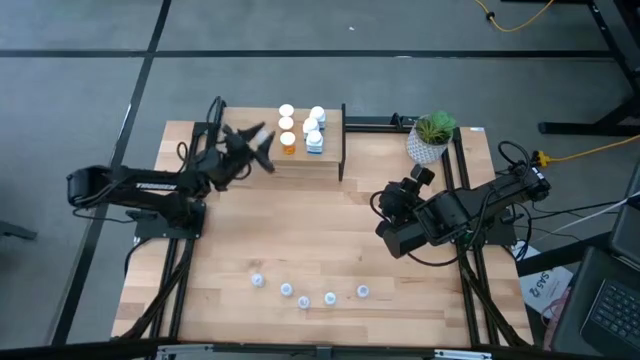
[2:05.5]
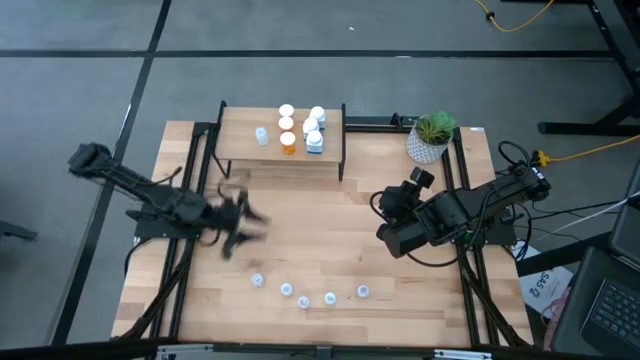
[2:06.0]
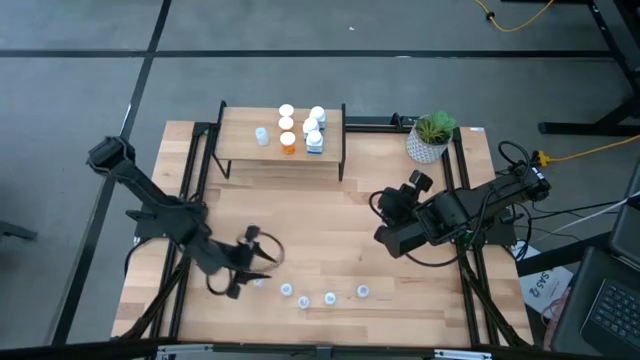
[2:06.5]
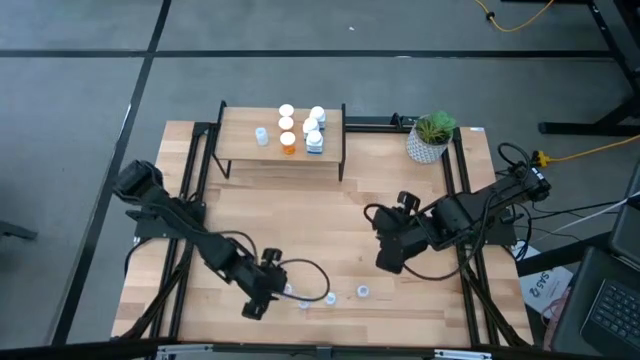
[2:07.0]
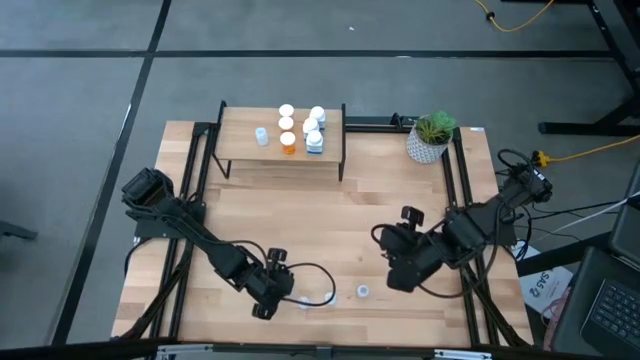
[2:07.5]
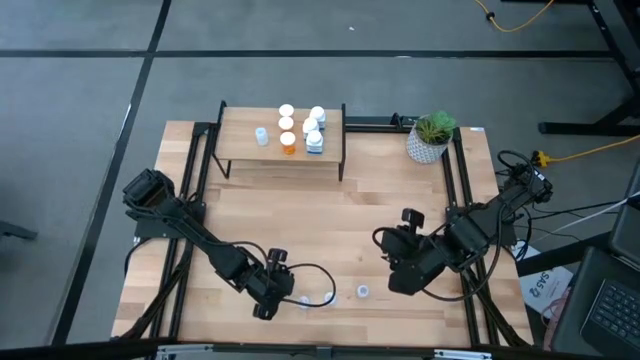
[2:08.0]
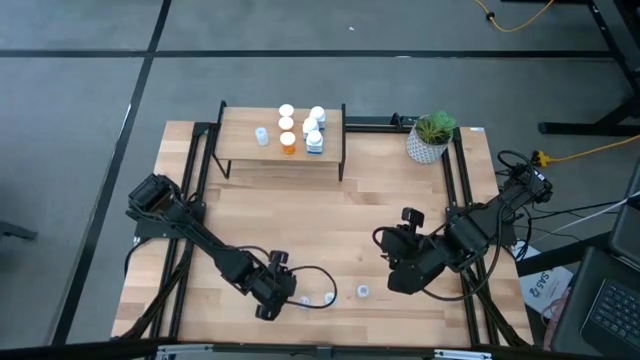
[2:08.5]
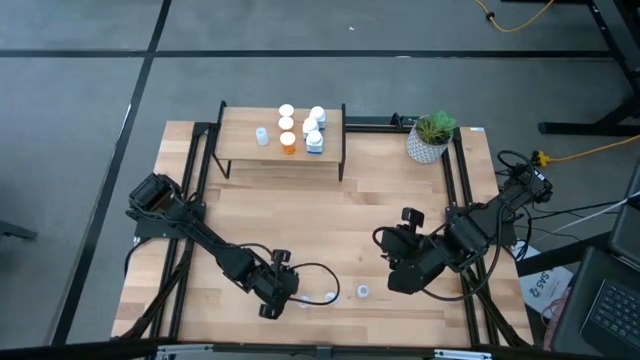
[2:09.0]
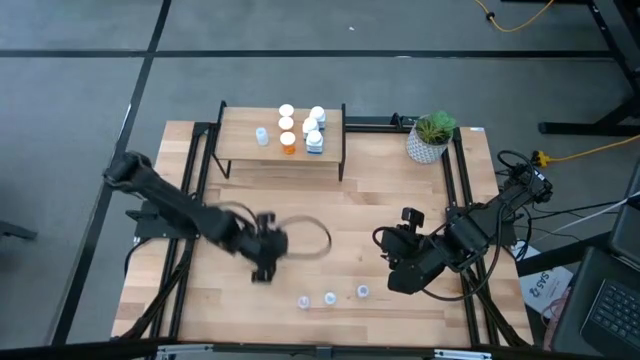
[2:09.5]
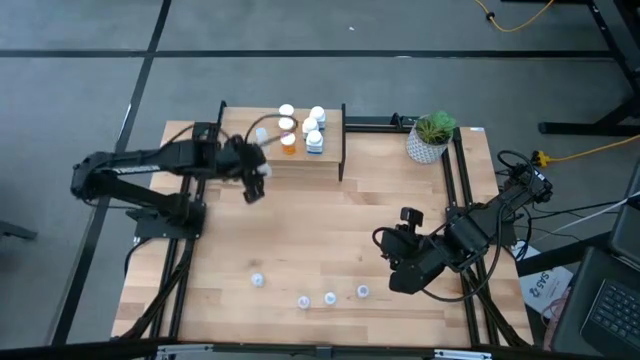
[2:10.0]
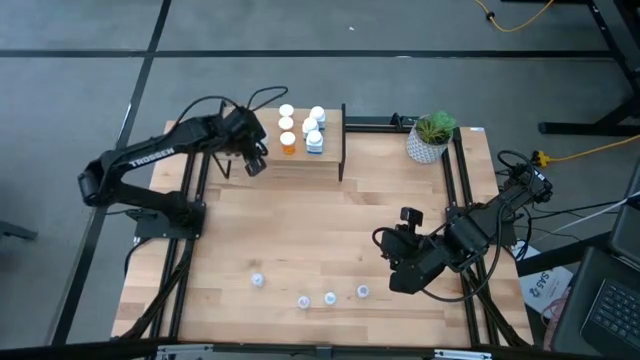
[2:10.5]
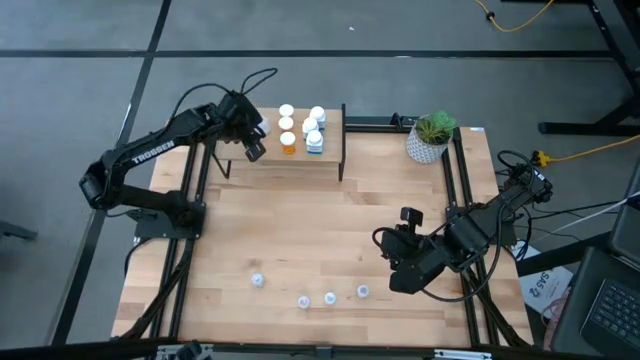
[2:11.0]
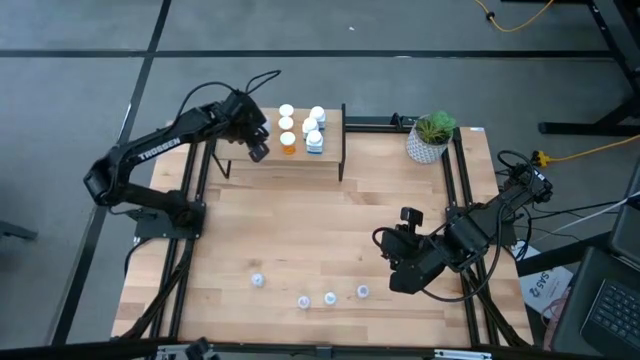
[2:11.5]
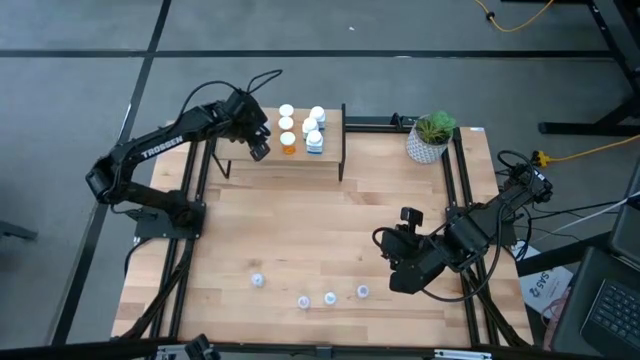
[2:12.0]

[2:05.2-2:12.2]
Task: Pick and place medicine bottles onto shelf by color
Put the transparent pill bottle on the shelf aligned with the transparent pill bottle

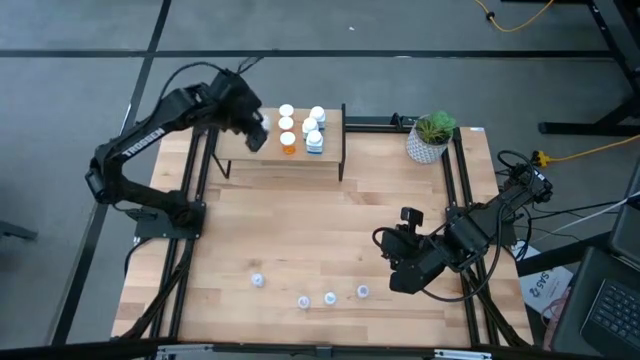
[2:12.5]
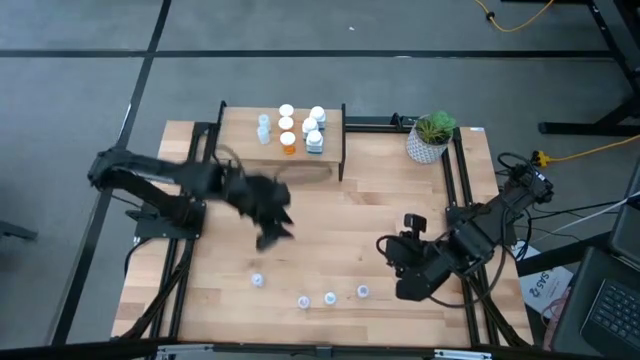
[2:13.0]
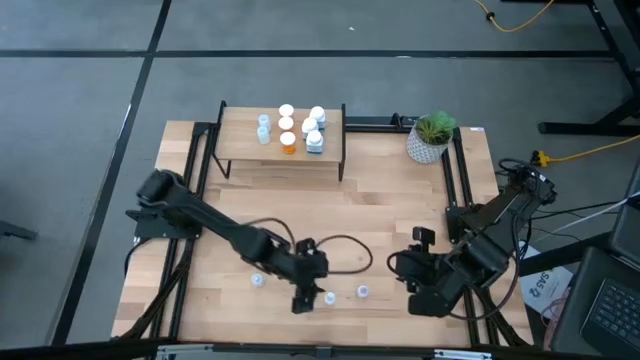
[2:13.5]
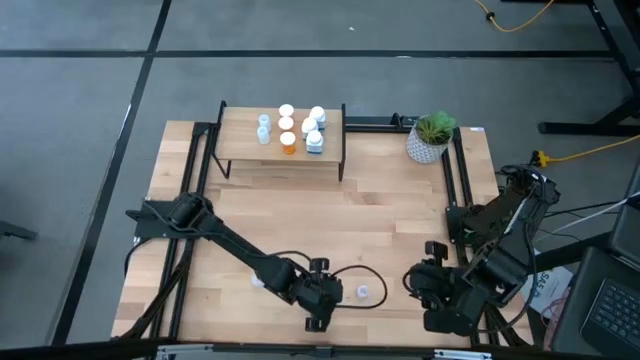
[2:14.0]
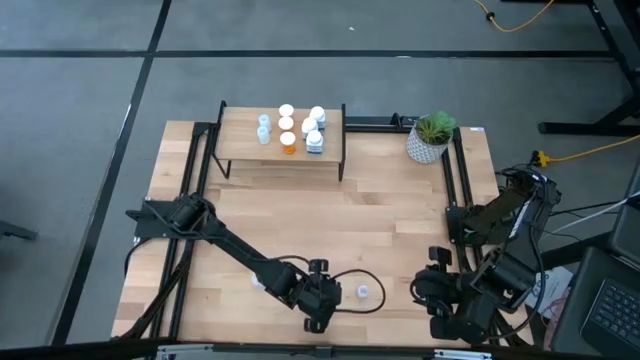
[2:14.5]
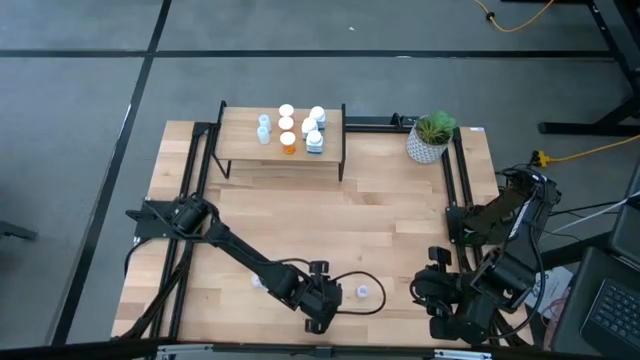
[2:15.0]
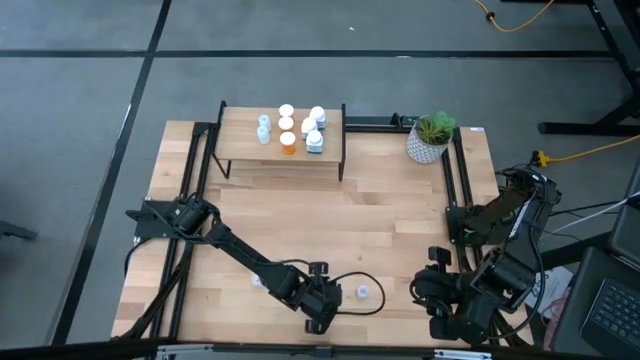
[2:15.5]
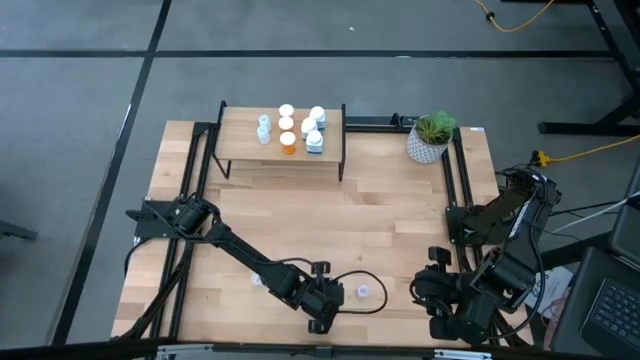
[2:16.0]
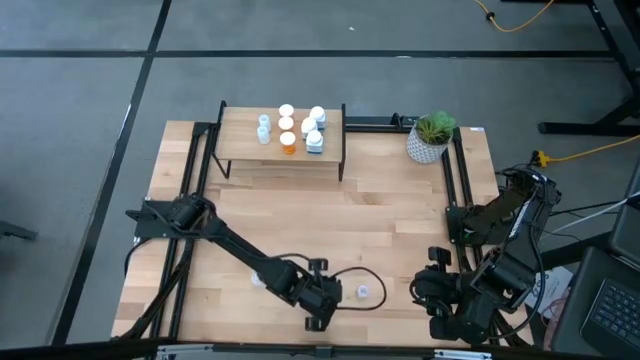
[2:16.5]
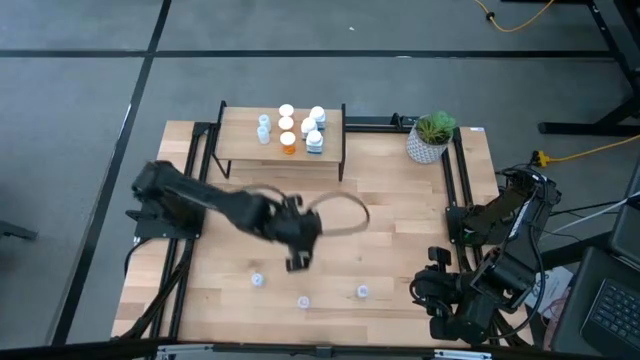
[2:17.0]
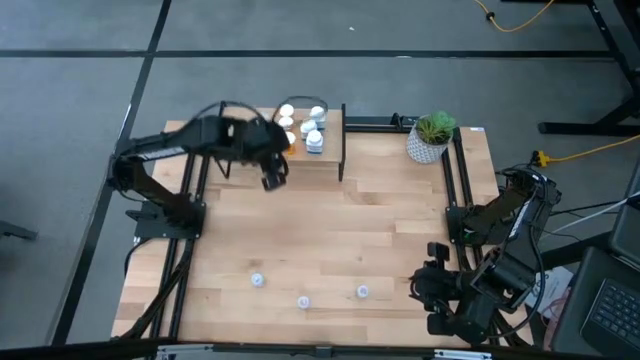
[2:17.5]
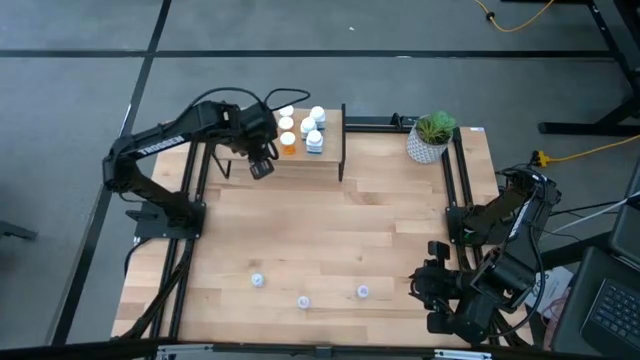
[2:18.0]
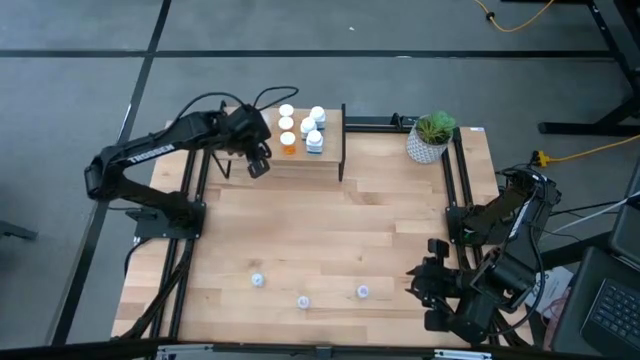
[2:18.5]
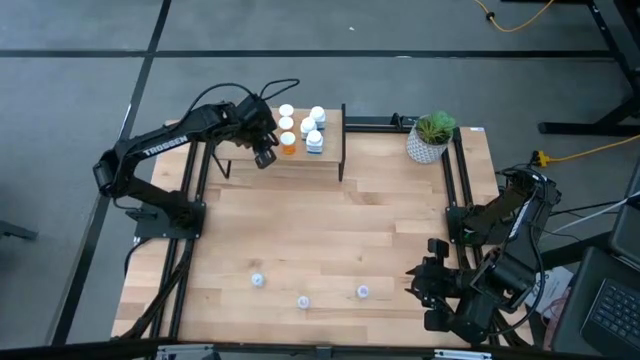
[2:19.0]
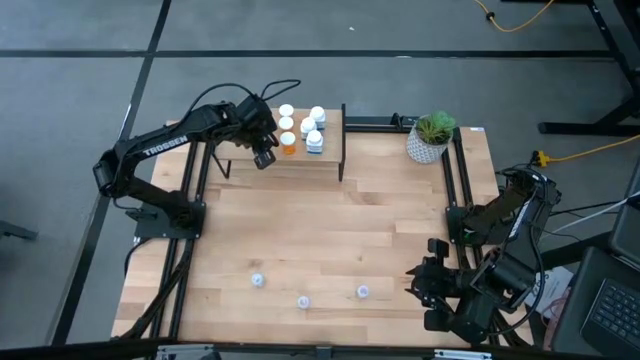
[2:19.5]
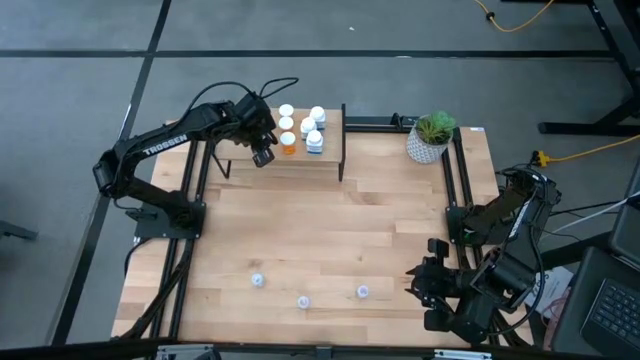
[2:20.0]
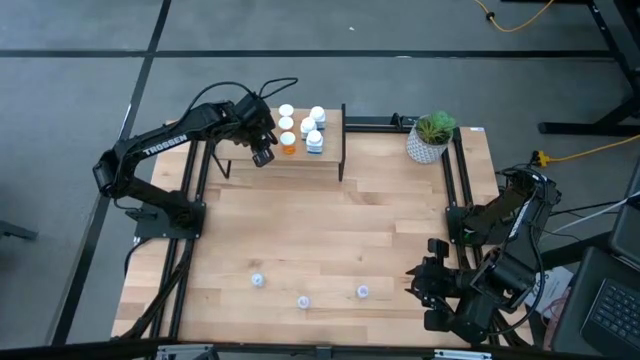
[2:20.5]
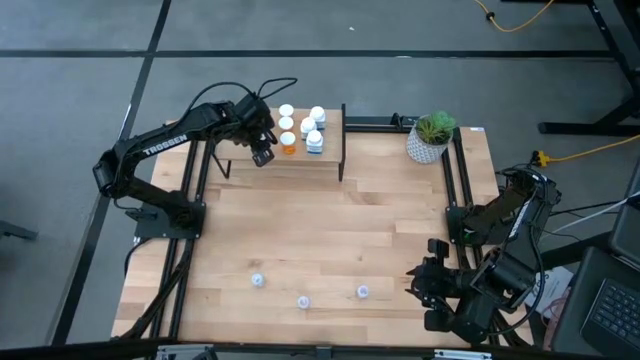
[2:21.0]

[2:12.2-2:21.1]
Put the transparent pill bottle on the shelf aligned with the transparent pill bottles

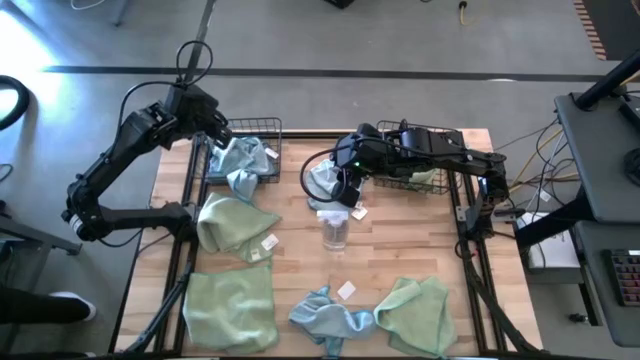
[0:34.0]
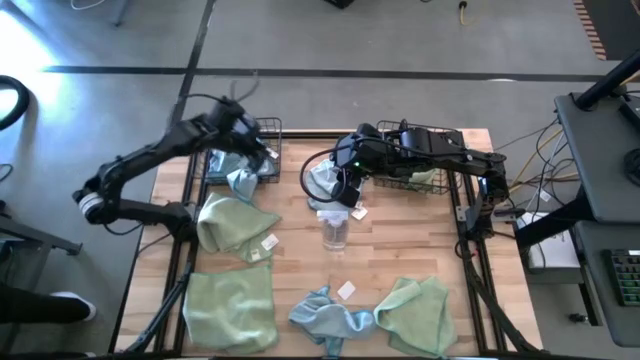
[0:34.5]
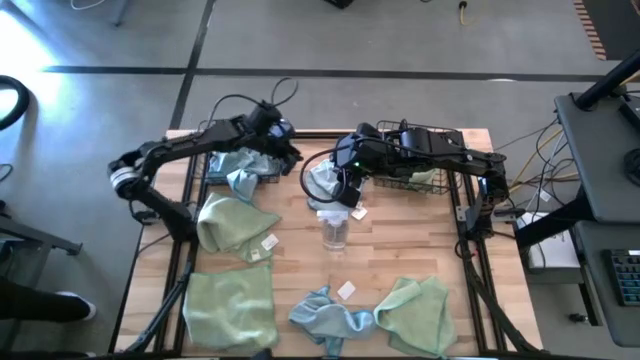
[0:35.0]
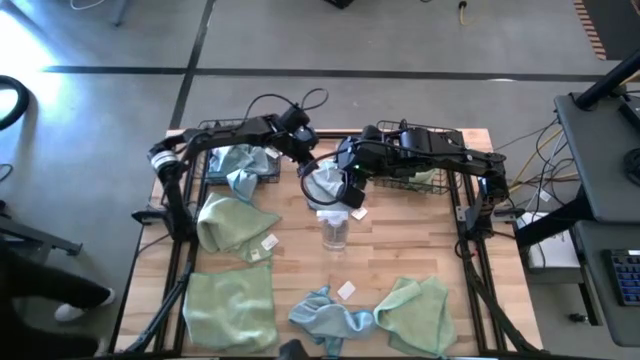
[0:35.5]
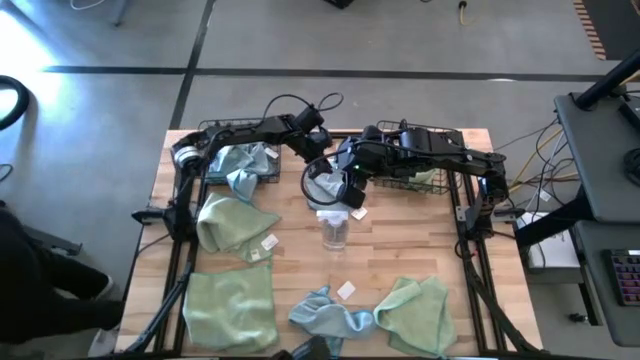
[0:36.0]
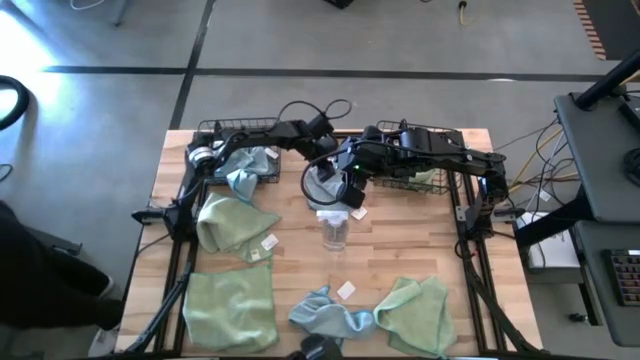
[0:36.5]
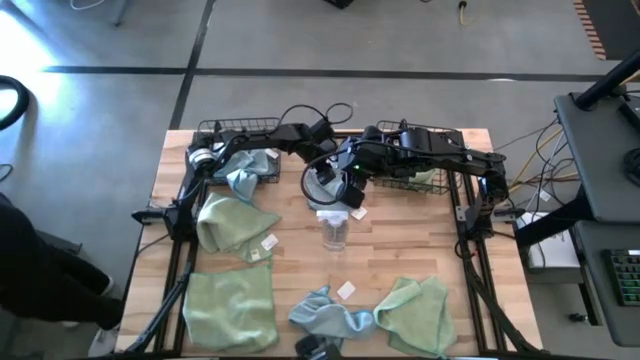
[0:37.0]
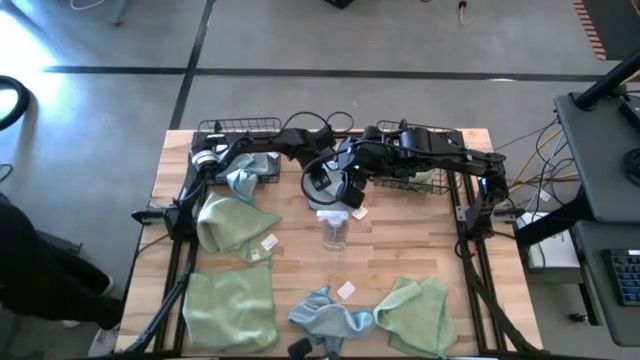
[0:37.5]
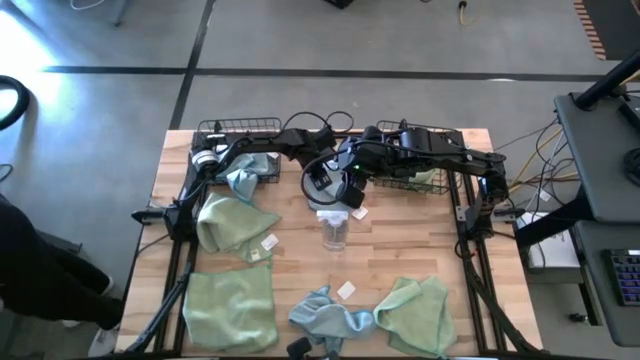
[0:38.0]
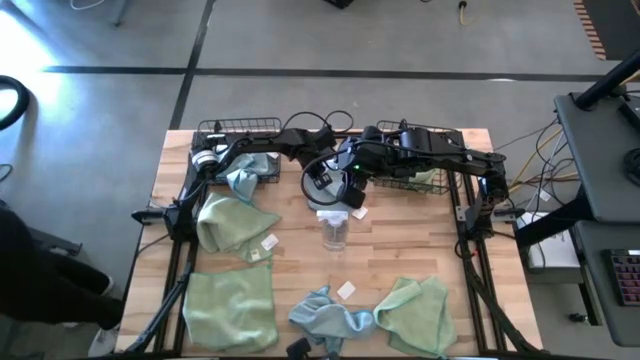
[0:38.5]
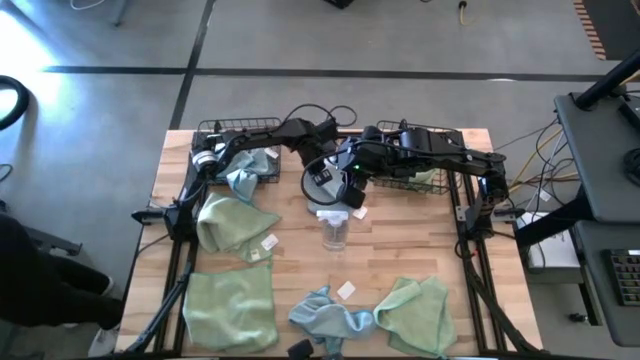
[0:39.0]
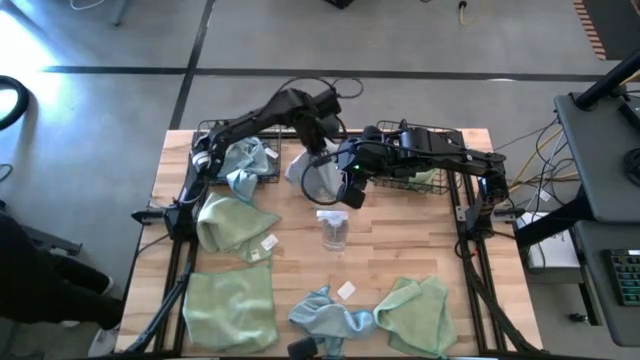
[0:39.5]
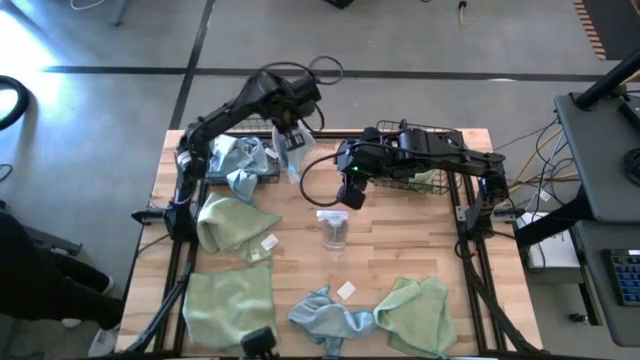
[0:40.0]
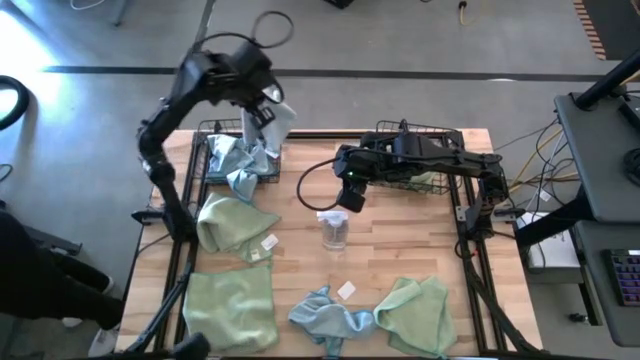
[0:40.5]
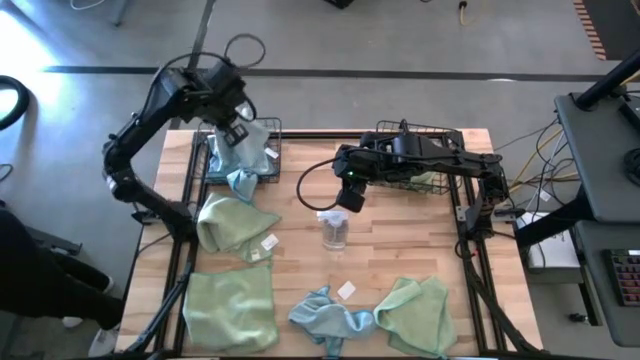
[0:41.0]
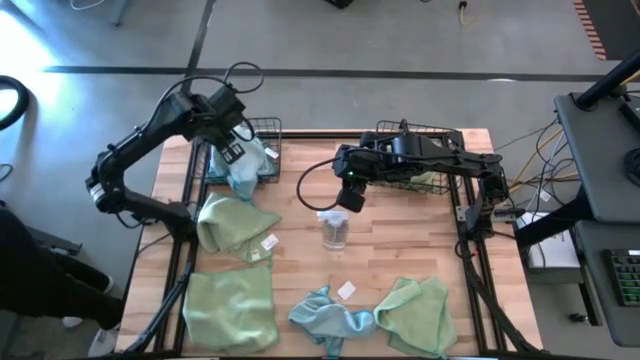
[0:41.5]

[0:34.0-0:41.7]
Task: Sort microfiber towel by color & place in baskets
Put the blue towel into the left wire basket
